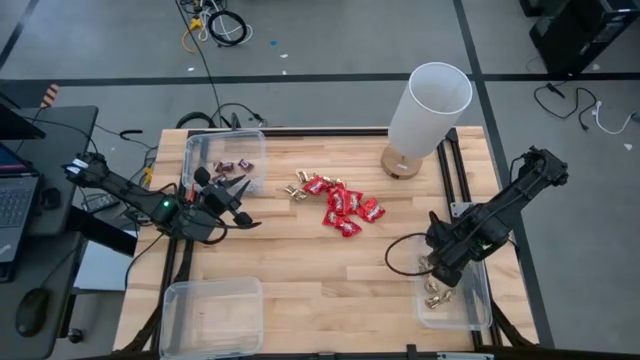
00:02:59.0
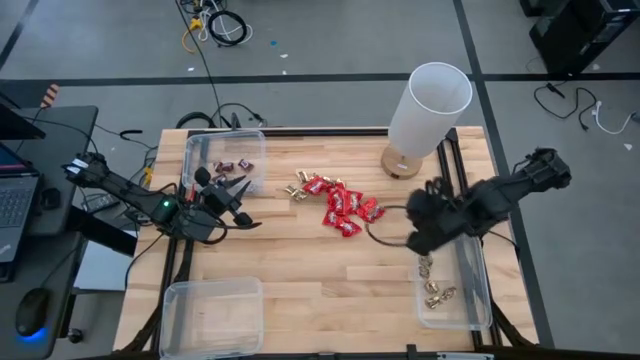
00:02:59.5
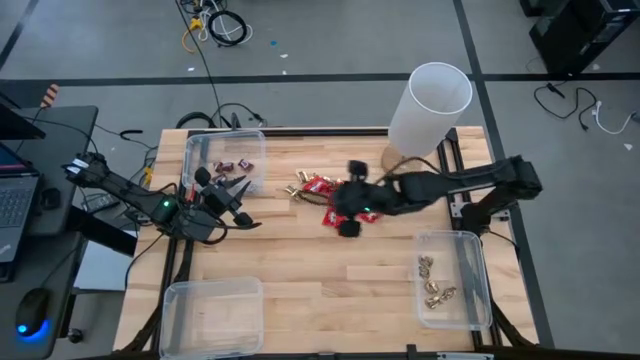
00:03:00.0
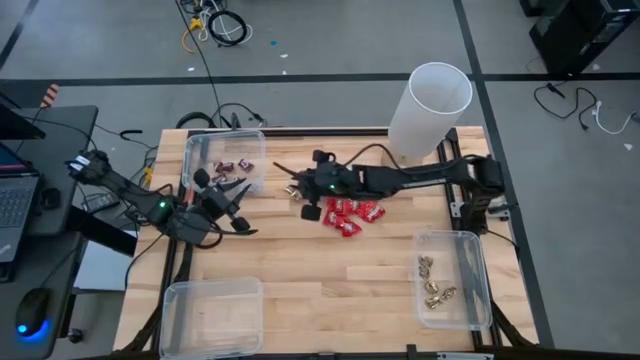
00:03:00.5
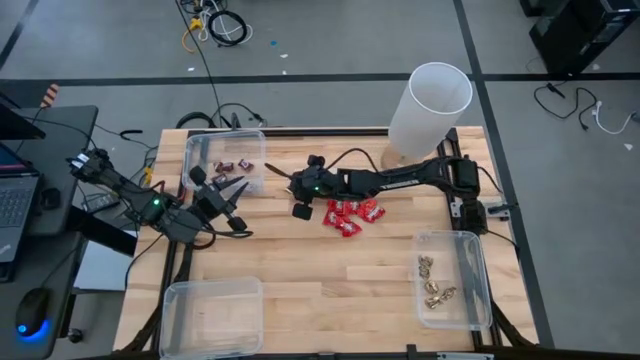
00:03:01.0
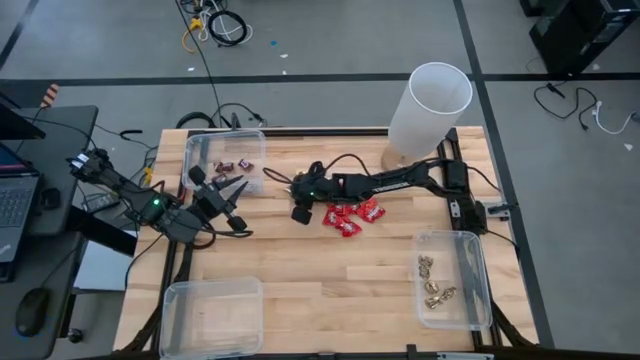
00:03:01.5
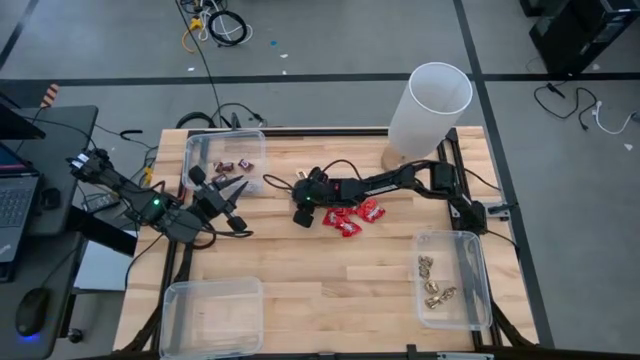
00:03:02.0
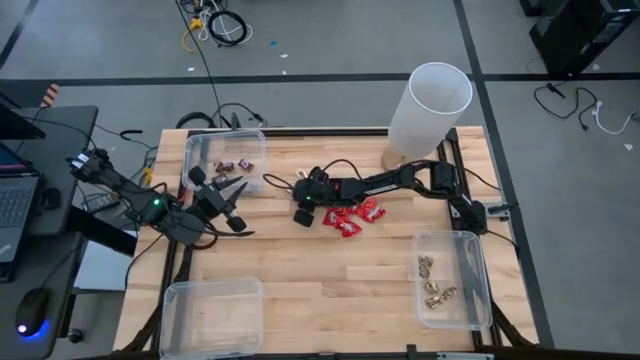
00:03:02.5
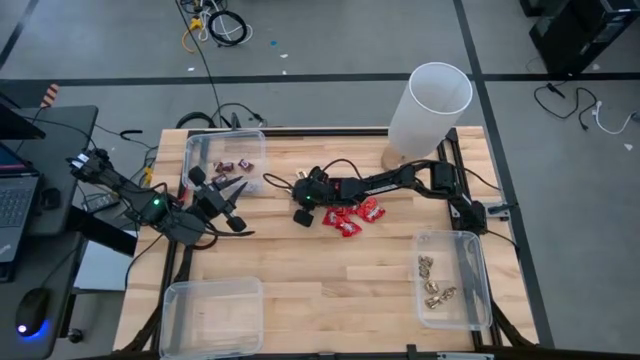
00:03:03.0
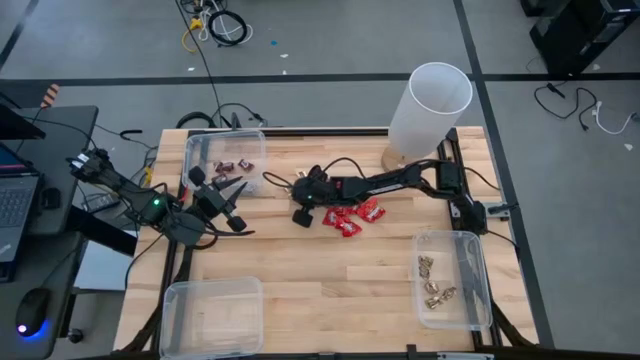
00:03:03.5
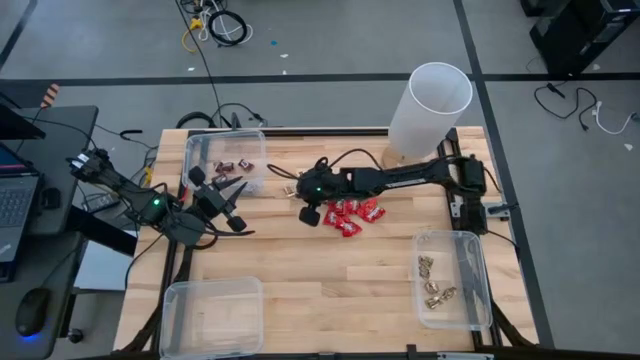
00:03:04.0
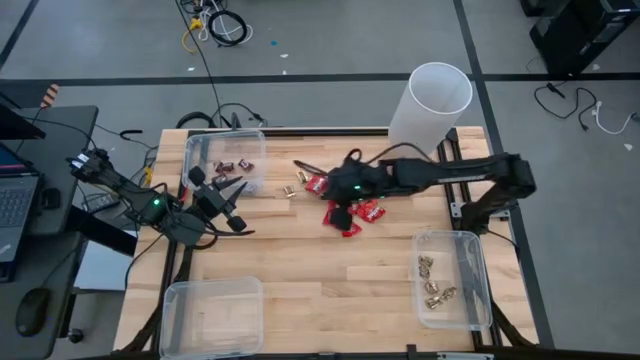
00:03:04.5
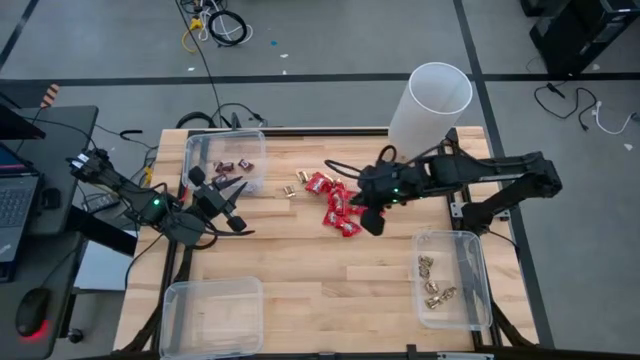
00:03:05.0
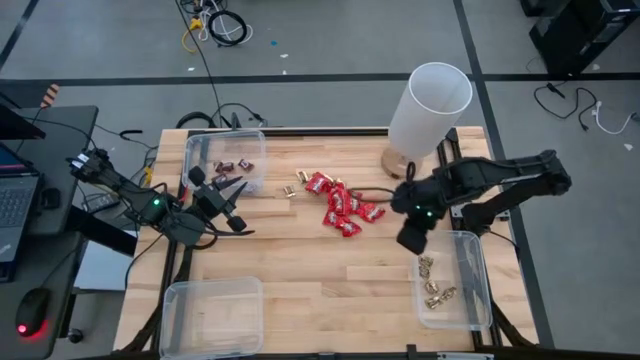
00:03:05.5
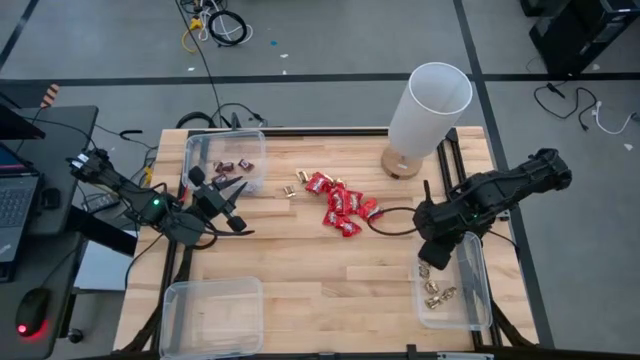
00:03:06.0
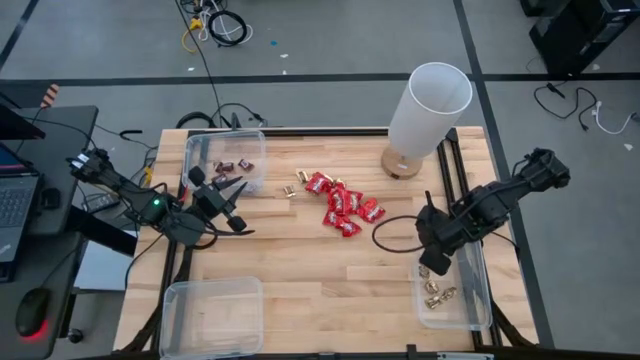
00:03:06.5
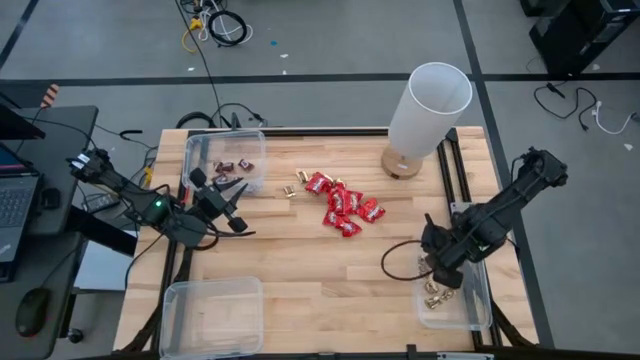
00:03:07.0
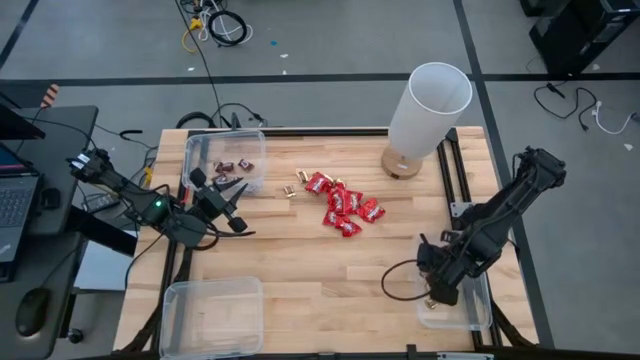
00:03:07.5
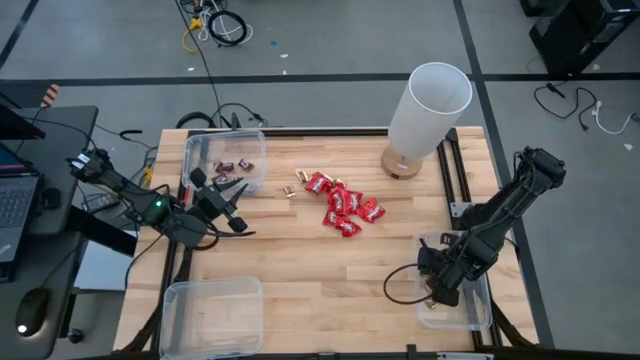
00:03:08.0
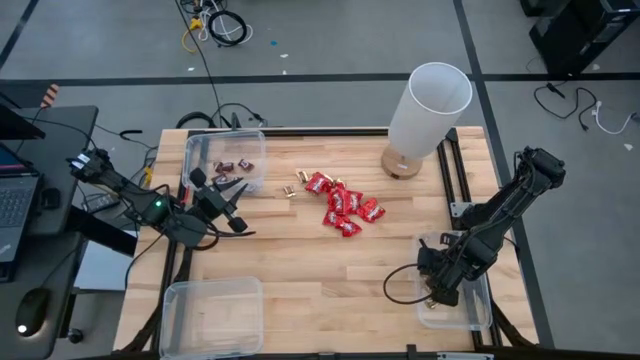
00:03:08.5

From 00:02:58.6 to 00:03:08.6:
Task: Sort candy
Put the gold chocolate into the bottom right transparent bin

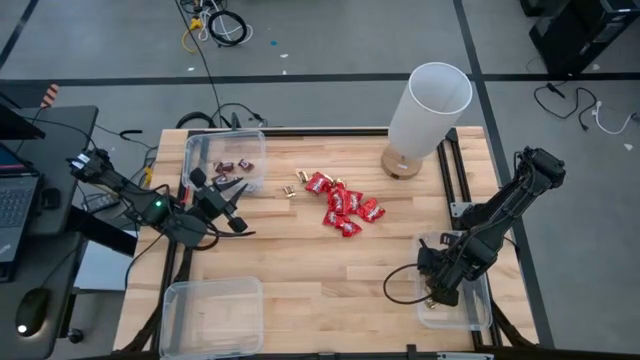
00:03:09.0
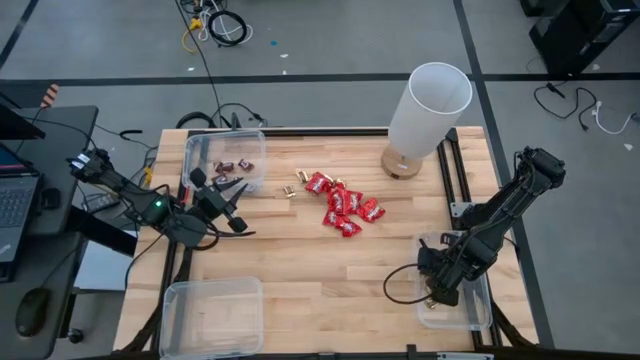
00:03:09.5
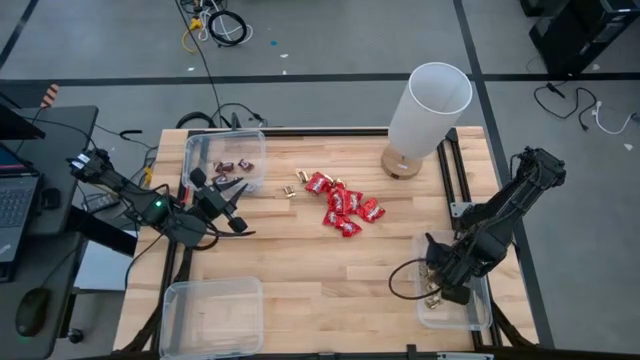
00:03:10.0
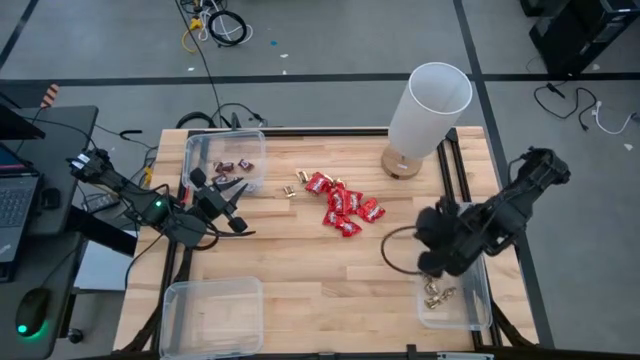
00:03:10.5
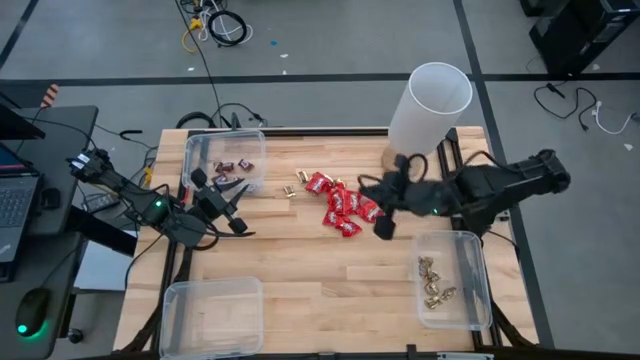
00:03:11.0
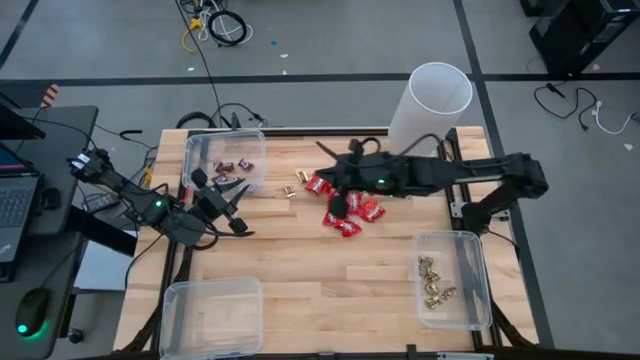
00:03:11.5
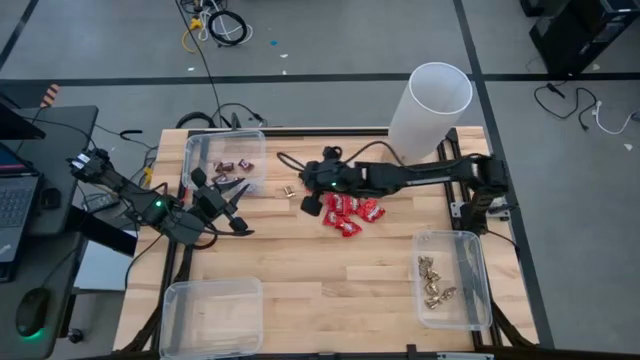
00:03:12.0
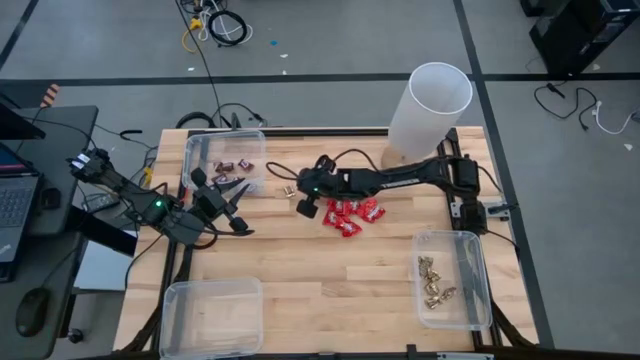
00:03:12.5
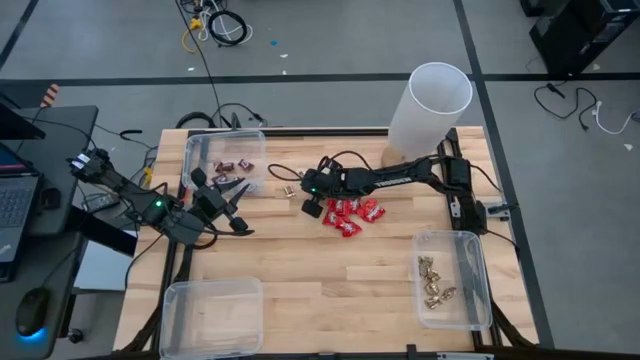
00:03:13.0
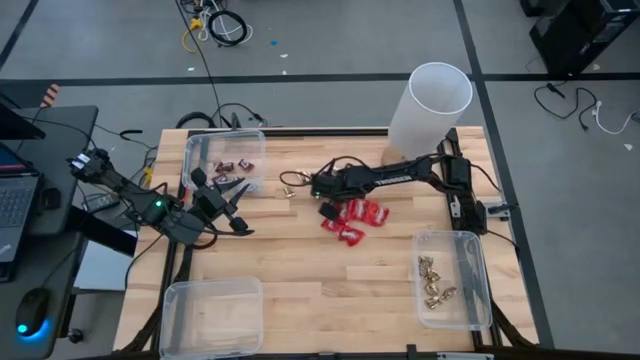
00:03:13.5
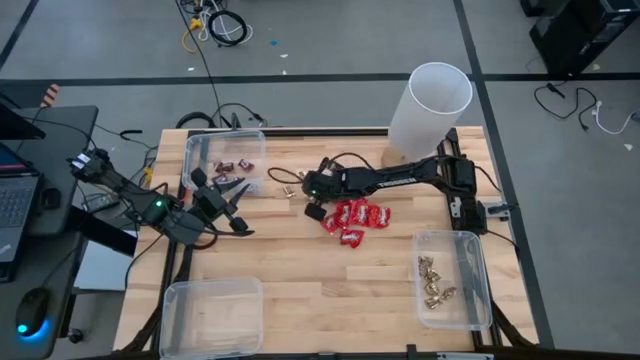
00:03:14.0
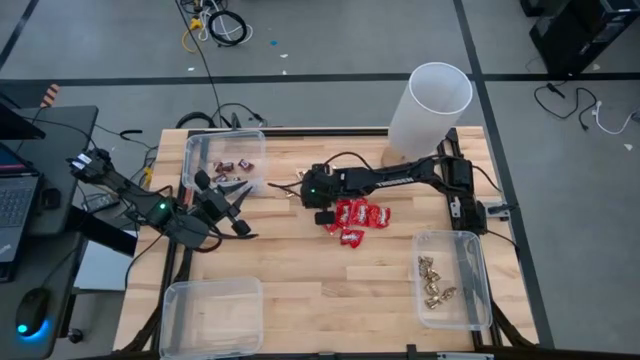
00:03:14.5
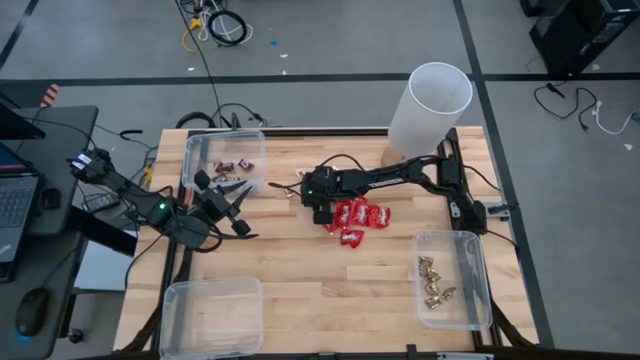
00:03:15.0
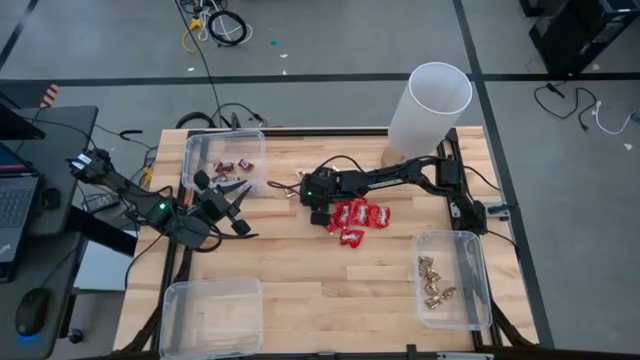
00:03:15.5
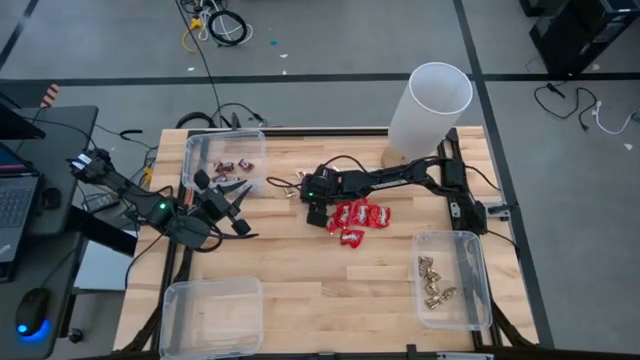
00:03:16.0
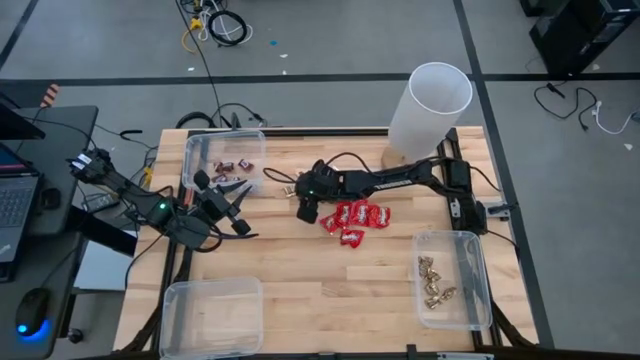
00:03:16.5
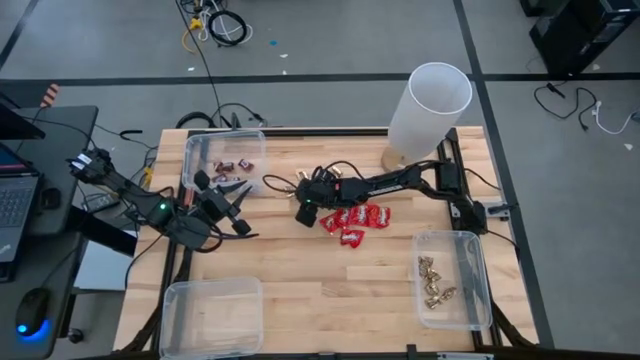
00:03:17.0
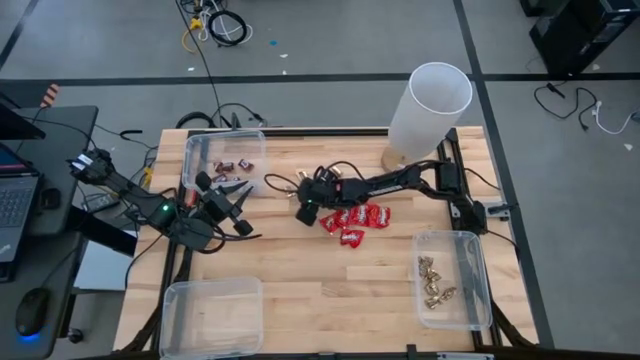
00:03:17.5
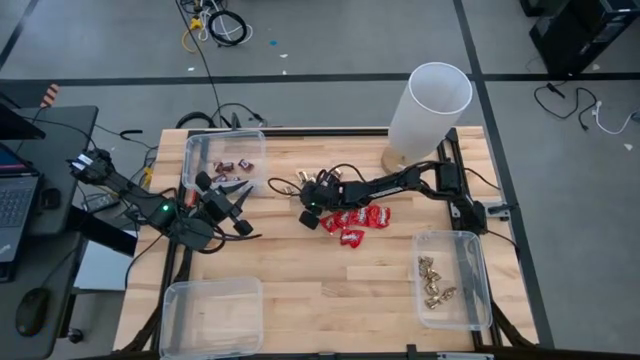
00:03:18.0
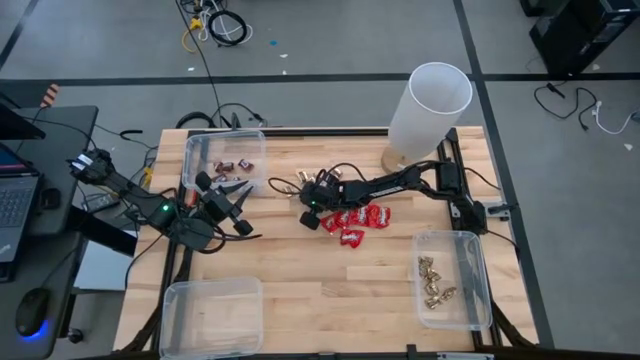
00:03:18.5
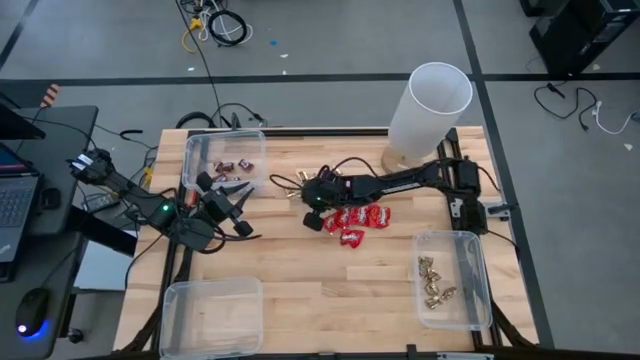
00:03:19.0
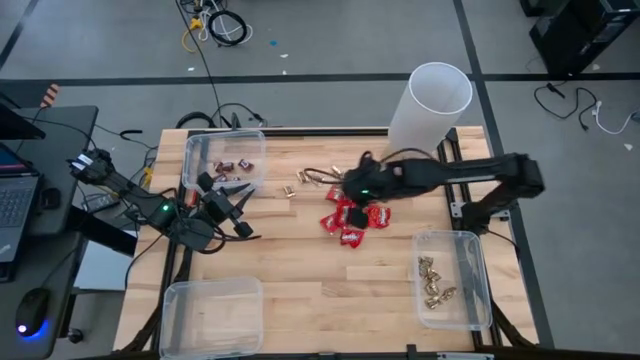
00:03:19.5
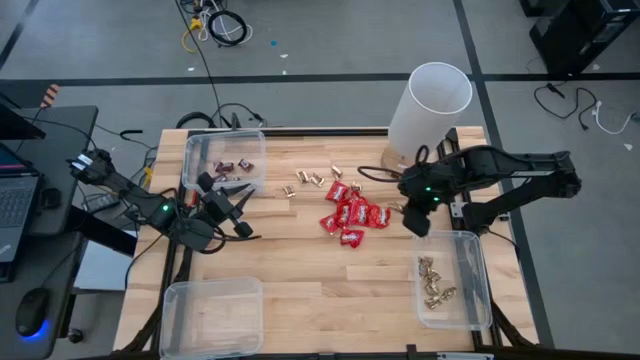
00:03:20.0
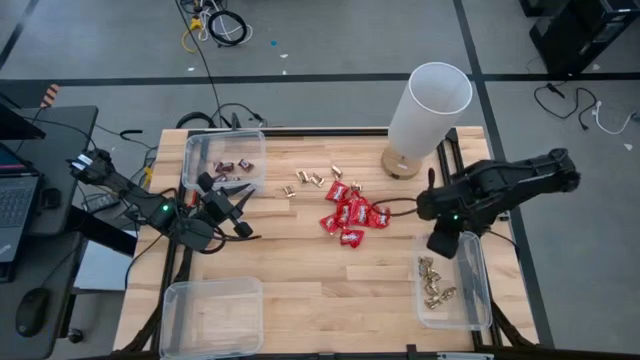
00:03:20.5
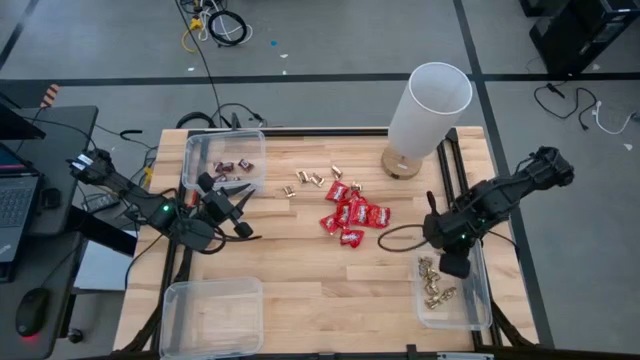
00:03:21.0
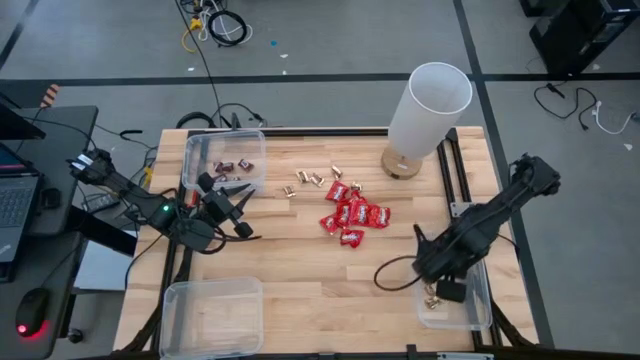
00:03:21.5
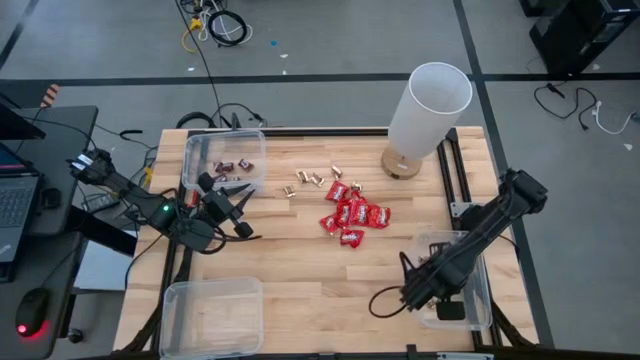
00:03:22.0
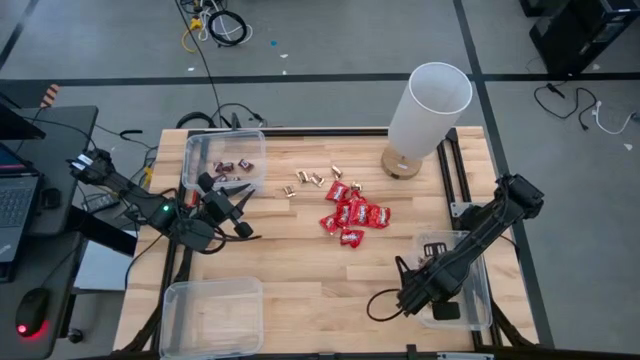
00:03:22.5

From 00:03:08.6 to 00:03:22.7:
Put the gold chocolate into the bottom right transparent bin
